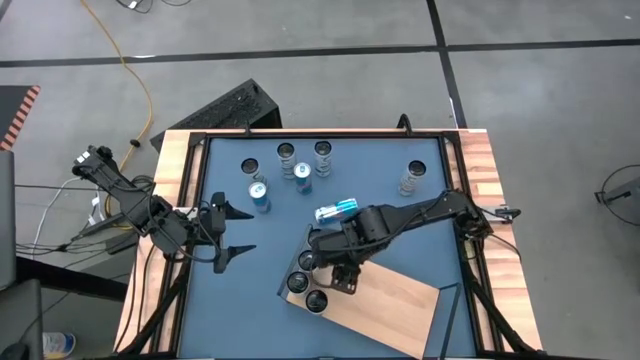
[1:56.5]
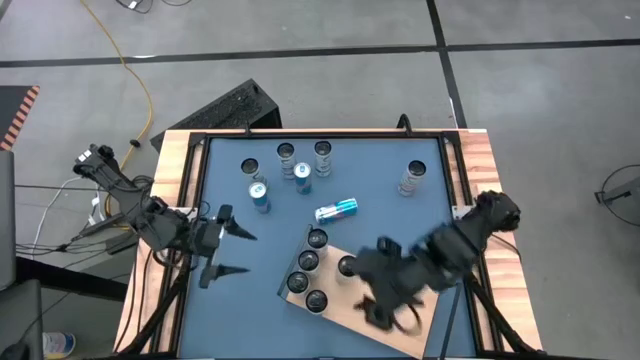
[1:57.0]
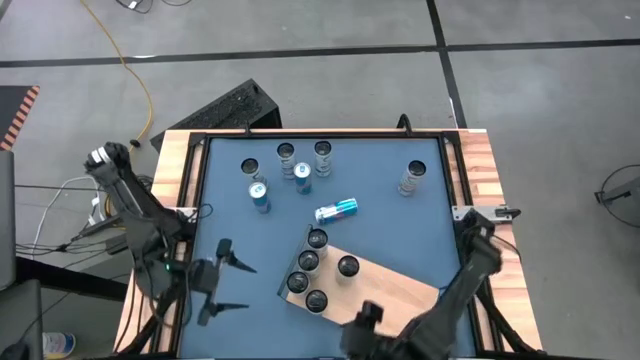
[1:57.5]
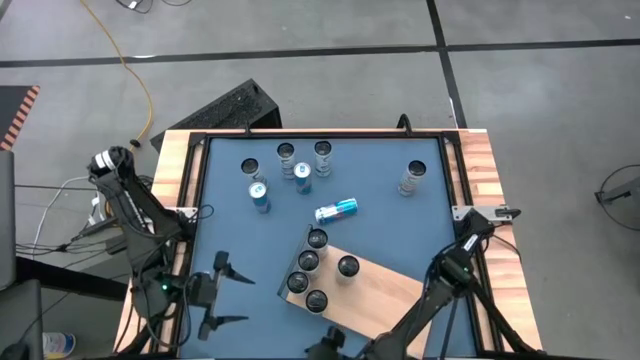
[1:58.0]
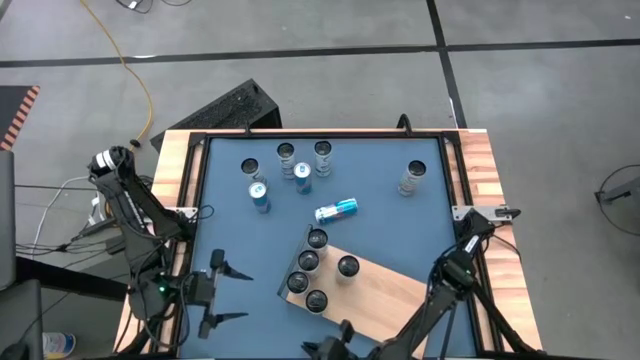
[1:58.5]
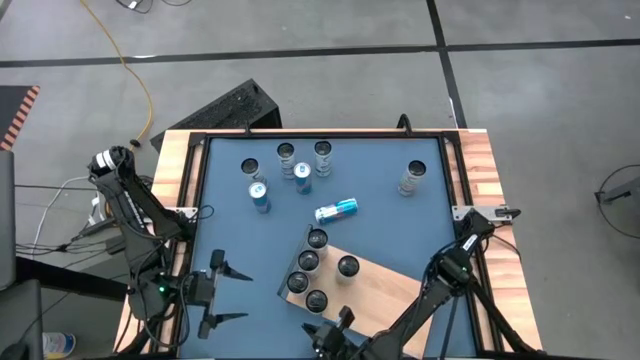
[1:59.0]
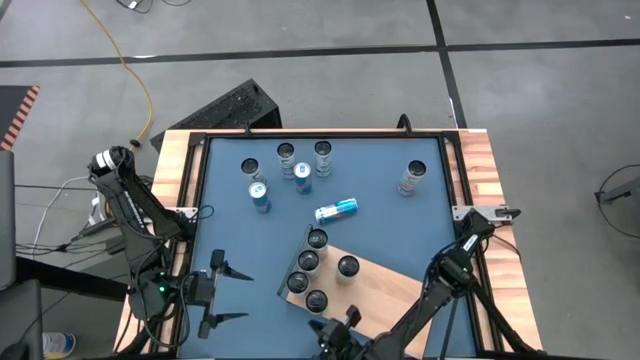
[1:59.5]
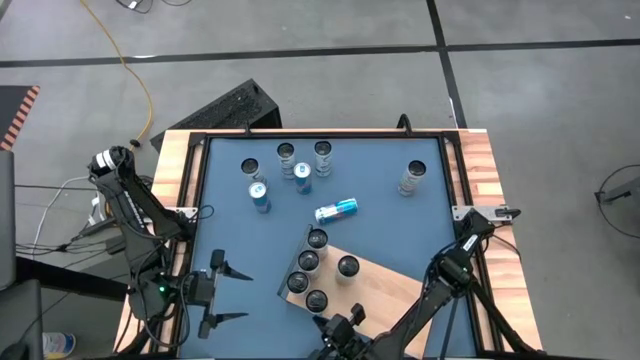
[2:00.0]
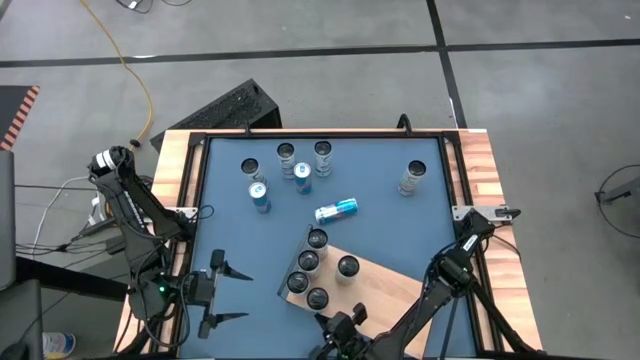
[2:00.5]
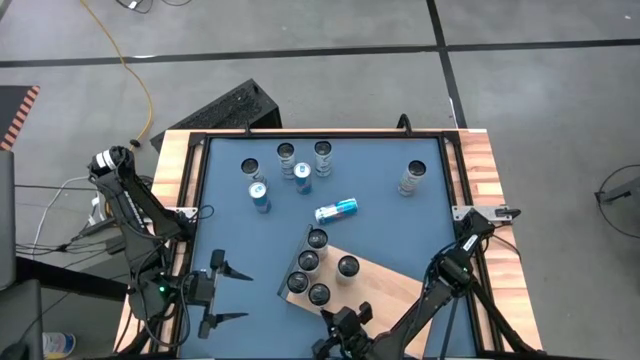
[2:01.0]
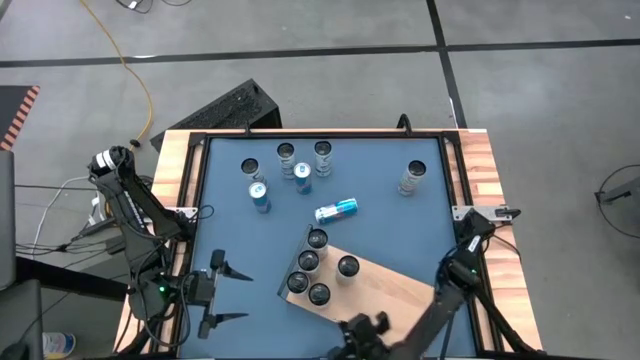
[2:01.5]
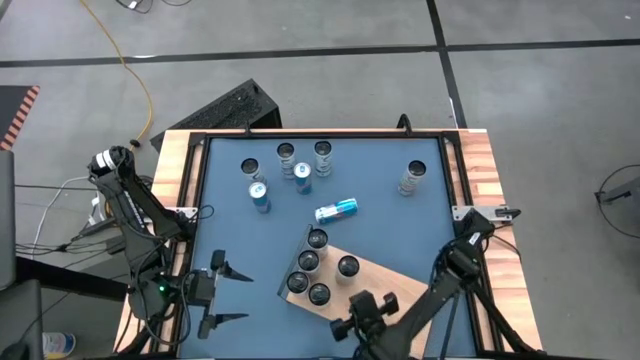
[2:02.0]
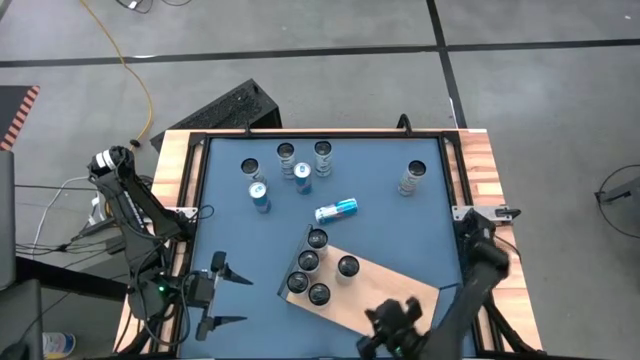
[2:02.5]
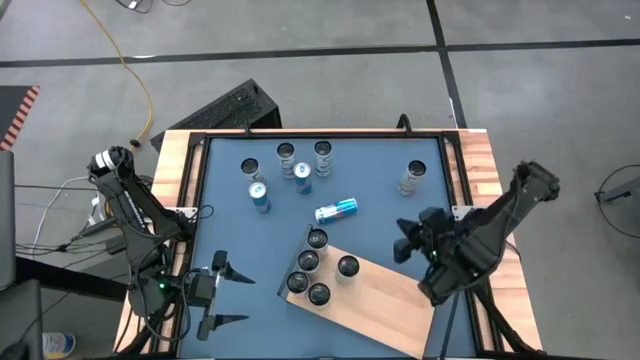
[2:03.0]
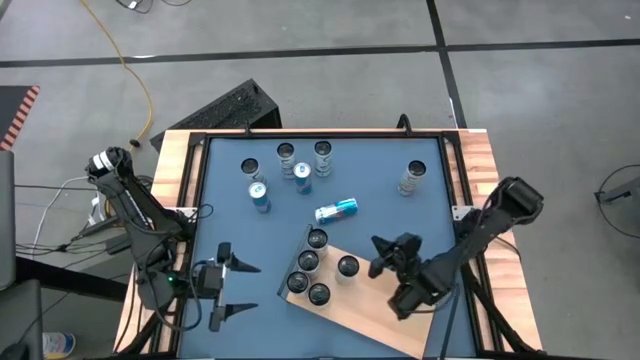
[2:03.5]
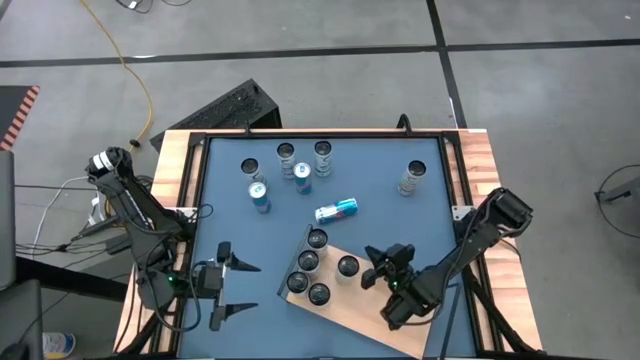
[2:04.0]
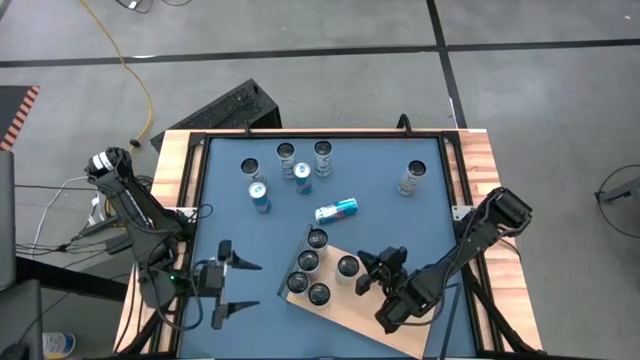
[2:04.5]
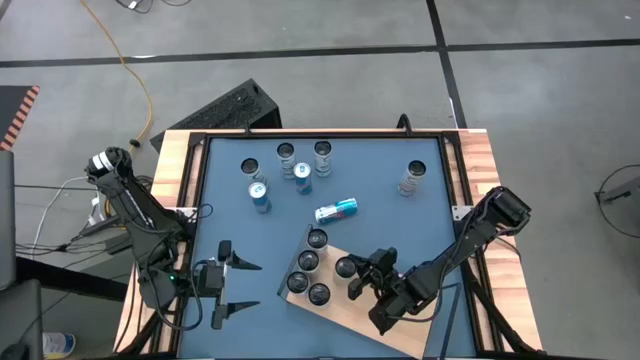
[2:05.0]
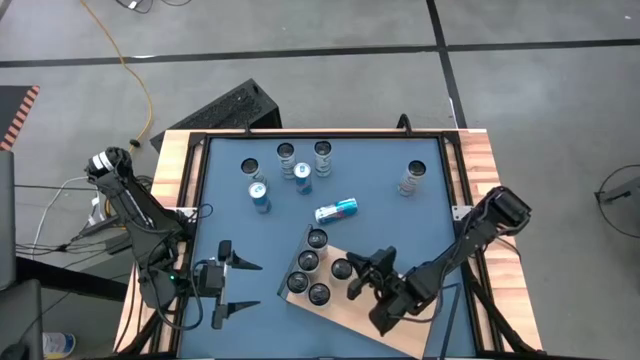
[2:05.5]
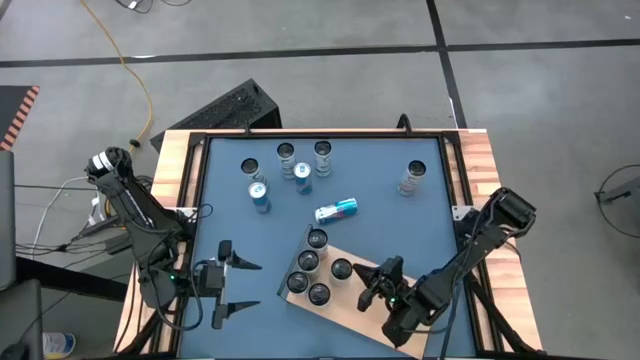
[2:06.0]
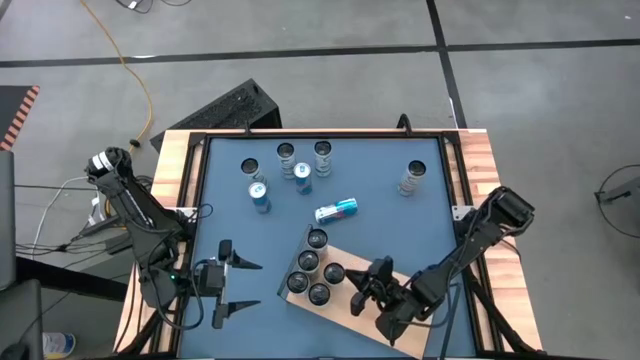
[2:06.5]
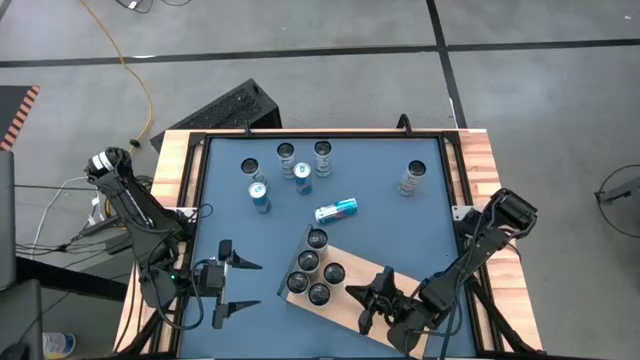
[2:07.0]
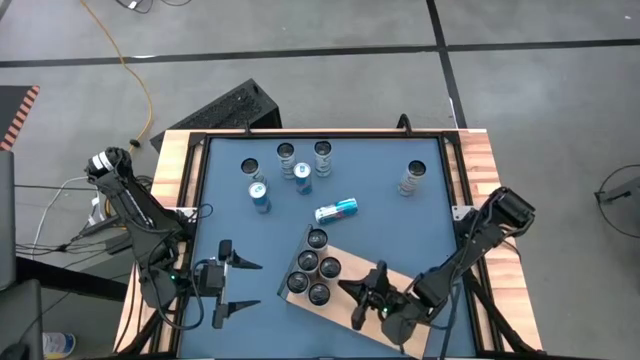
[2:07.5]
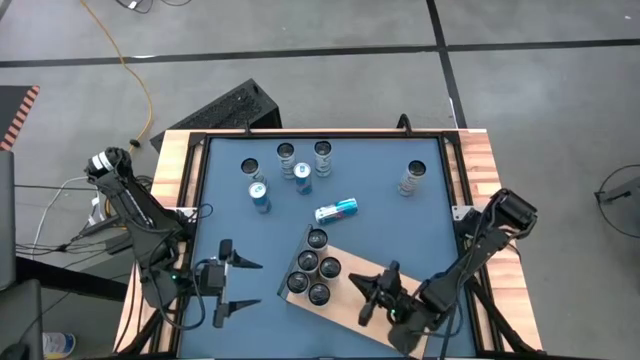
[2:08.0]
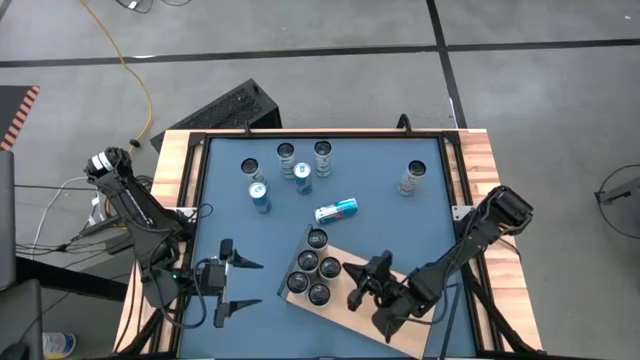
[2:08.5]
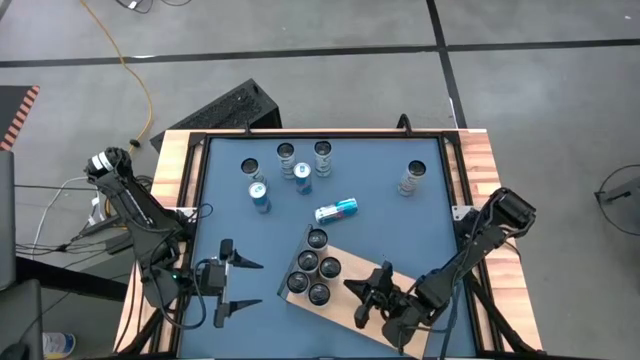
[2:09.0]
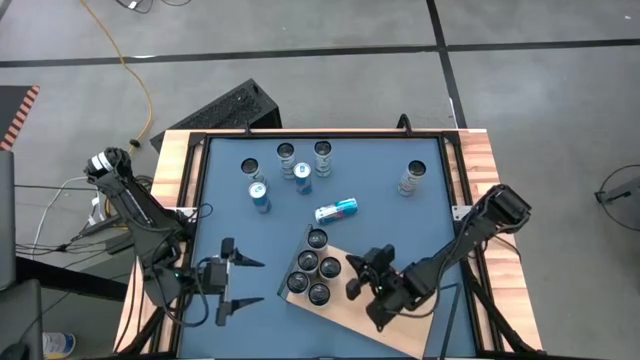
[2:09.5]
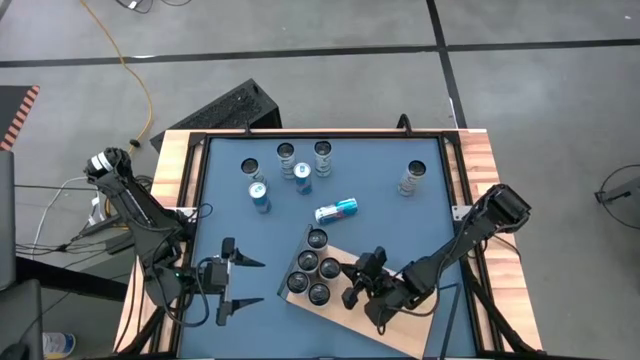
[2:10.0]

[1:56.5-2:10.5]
Task: Place canned beverage on shelf
Adjust the white yellow soda cans on the shelf

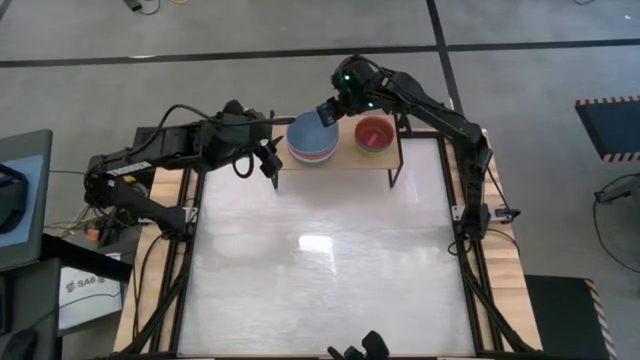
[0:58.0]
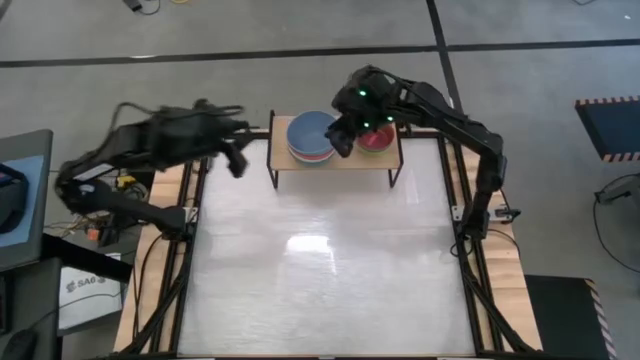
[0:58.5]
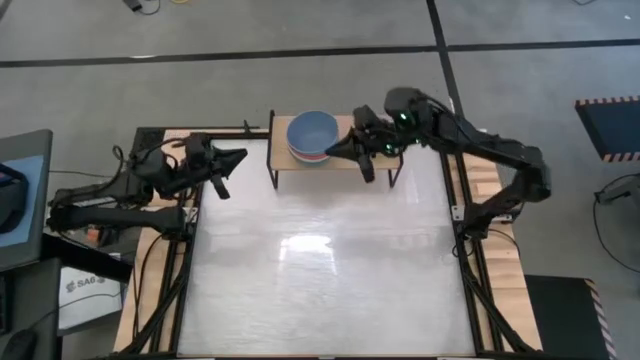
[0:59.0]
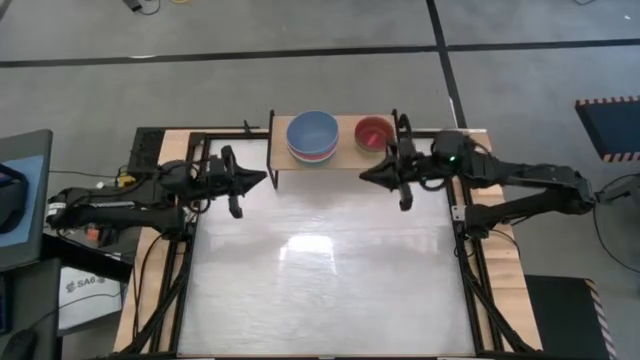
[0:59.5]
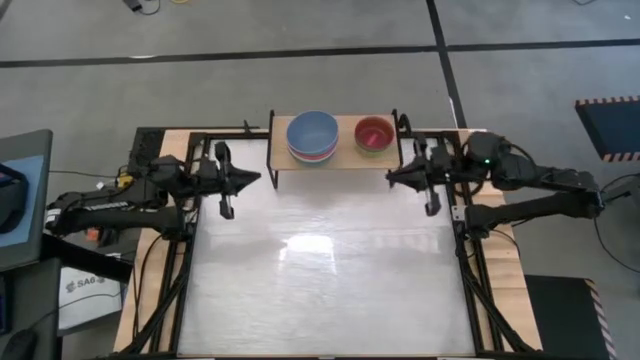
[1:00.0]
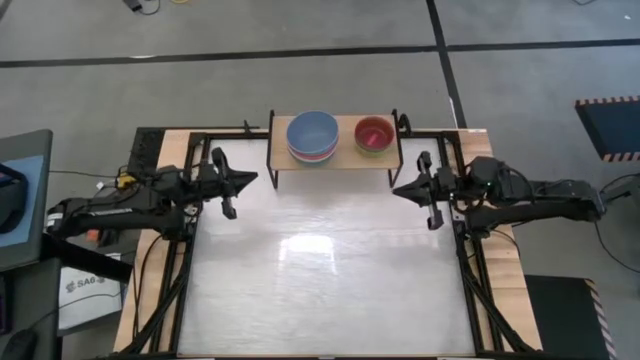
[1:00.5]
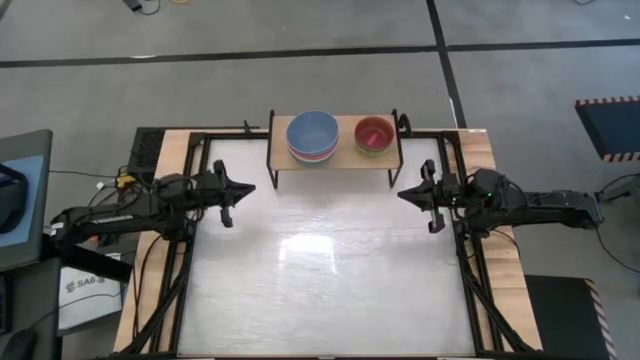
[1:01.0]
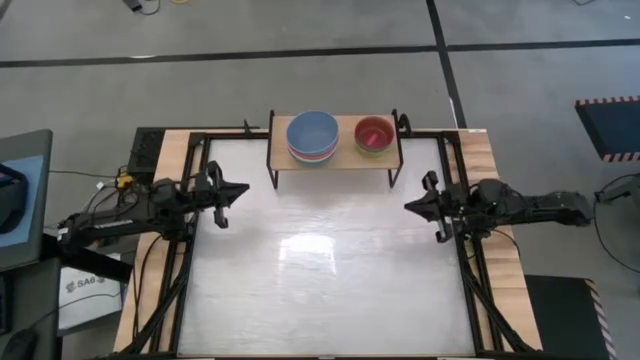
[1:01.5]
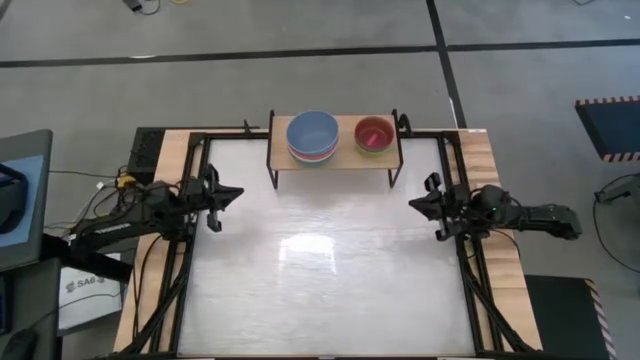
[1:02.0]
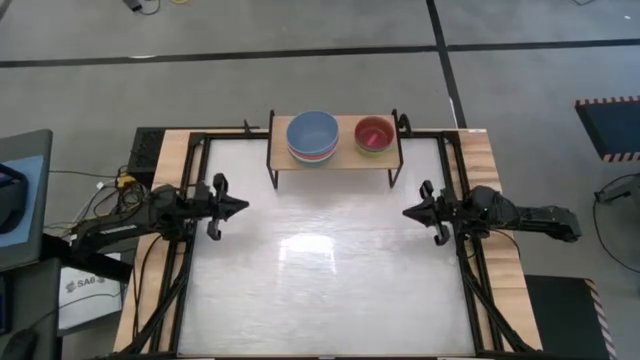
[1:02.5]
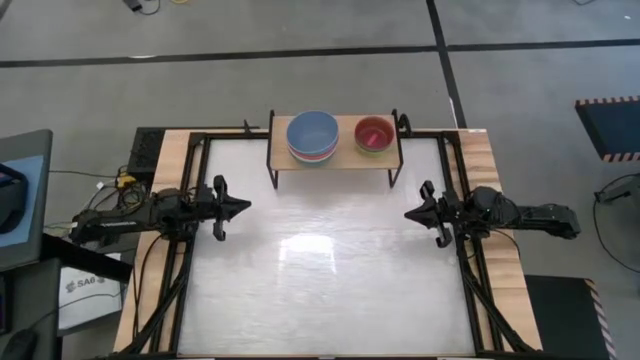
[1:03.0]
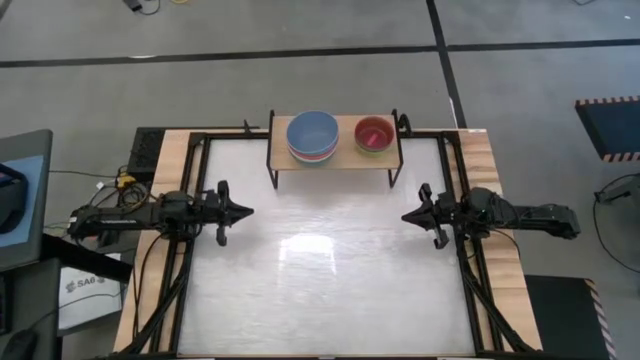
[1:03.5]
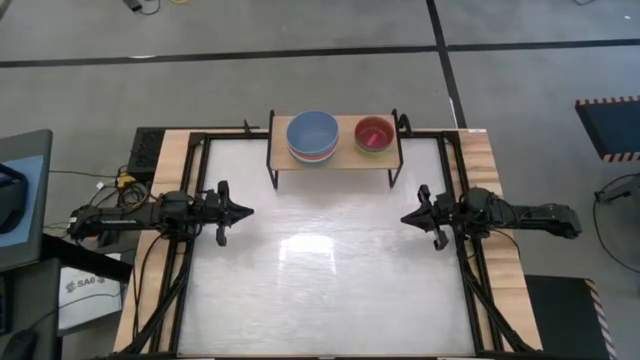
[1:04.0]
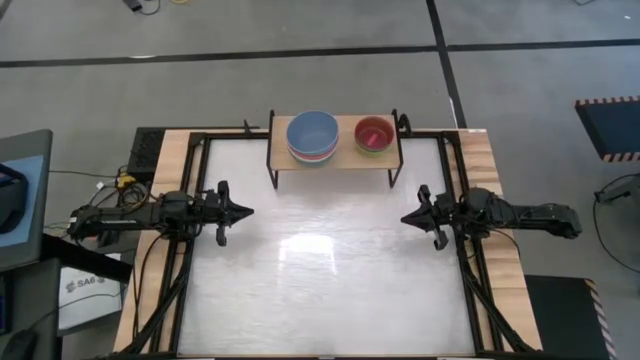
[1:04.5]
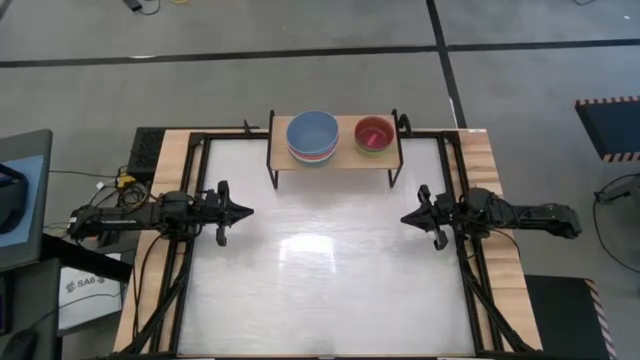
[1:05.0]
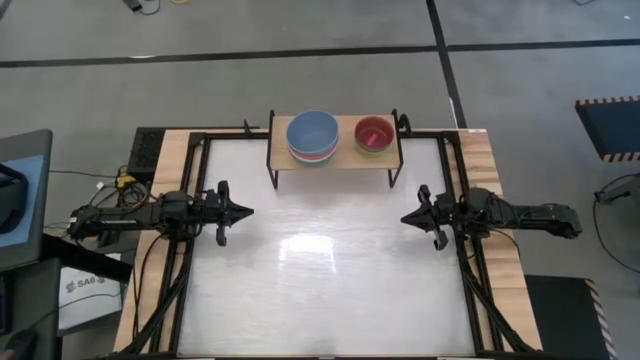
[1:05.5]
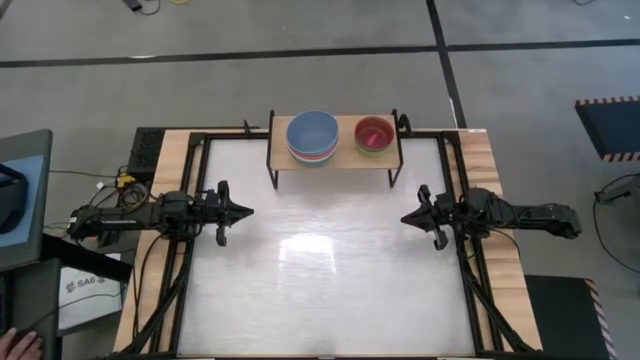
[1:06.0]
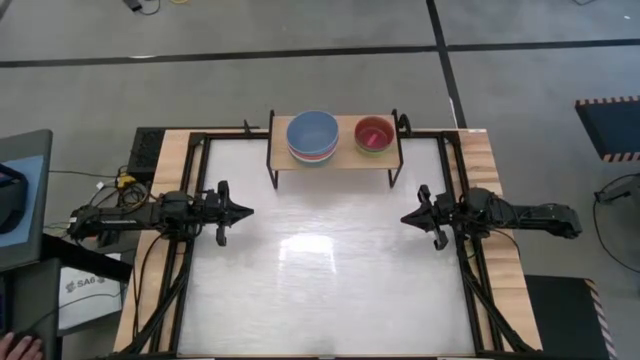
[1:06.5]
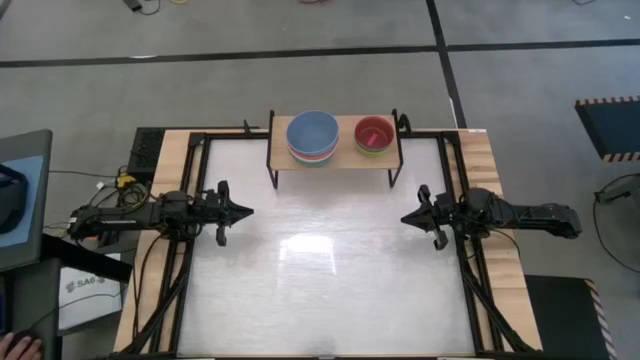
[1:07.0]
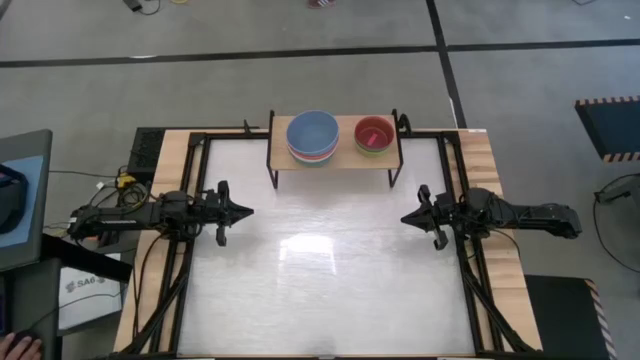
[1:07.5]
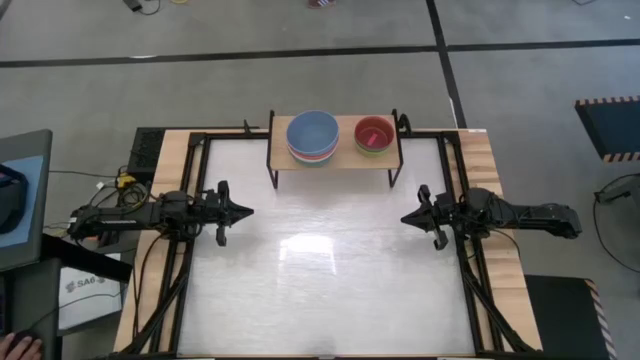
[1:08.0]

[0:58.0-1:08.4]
Task: Place and stack bowls onto a shelf
Return to Home Position
